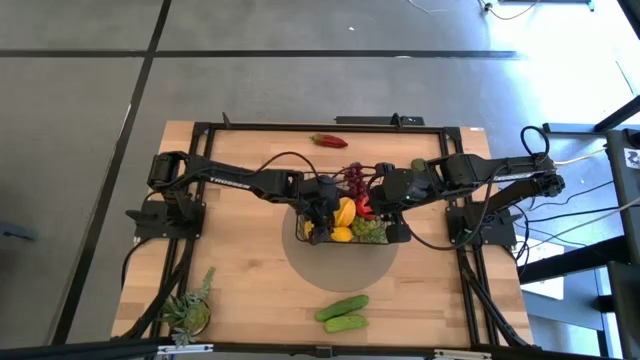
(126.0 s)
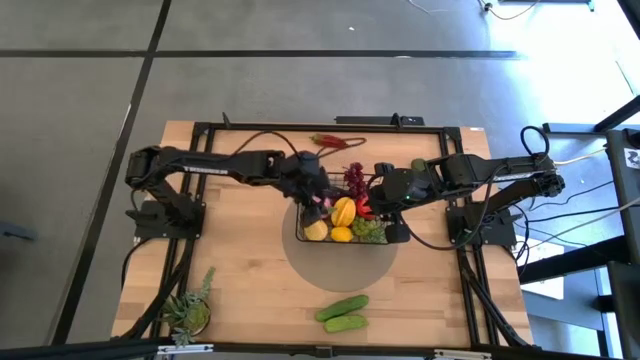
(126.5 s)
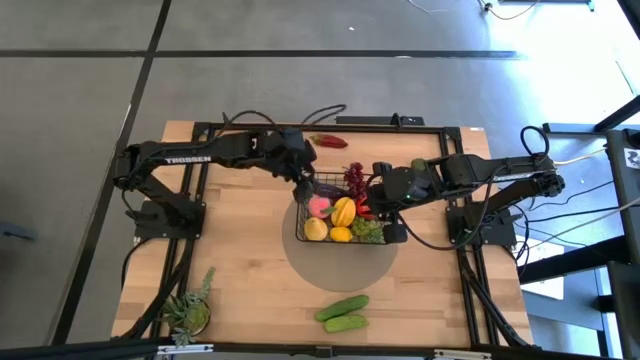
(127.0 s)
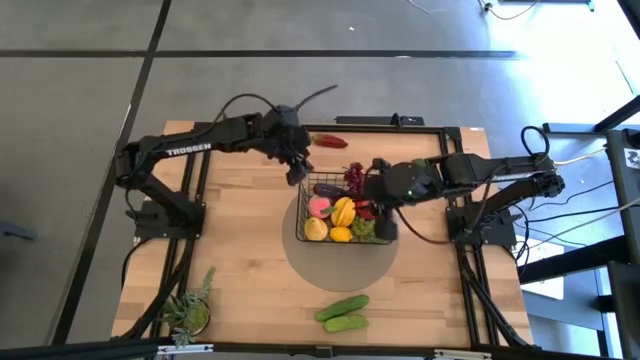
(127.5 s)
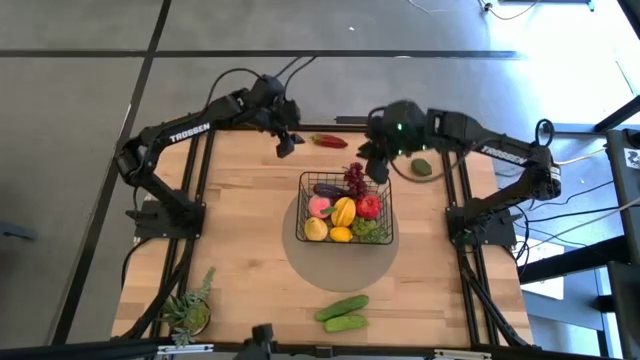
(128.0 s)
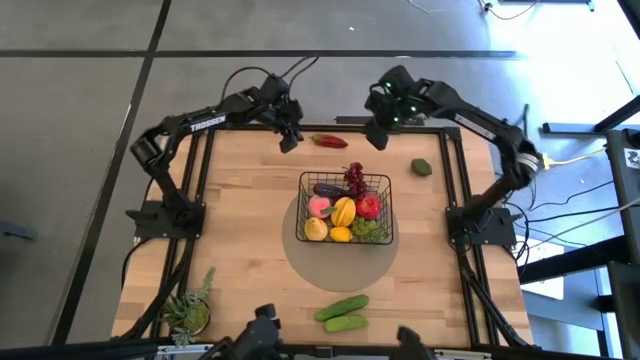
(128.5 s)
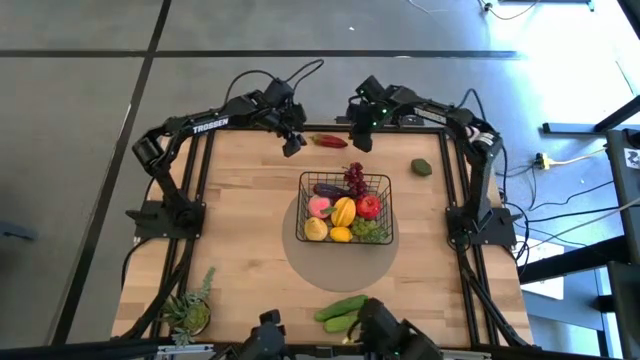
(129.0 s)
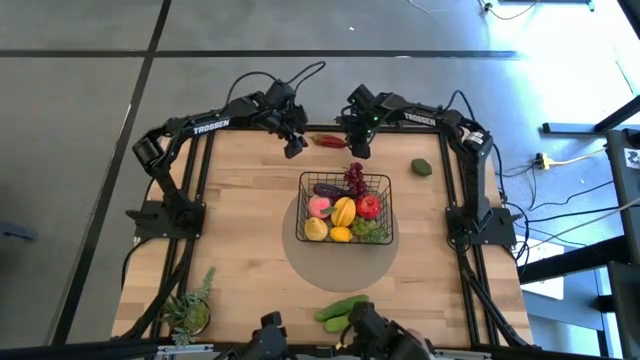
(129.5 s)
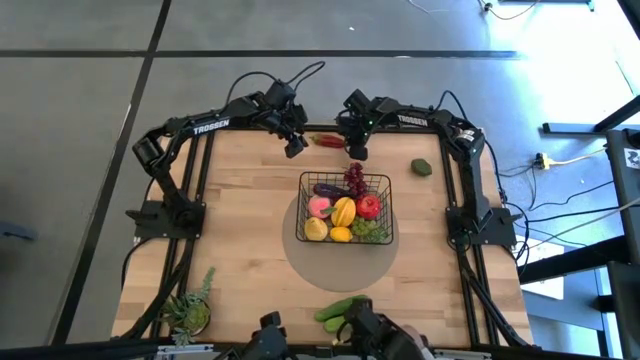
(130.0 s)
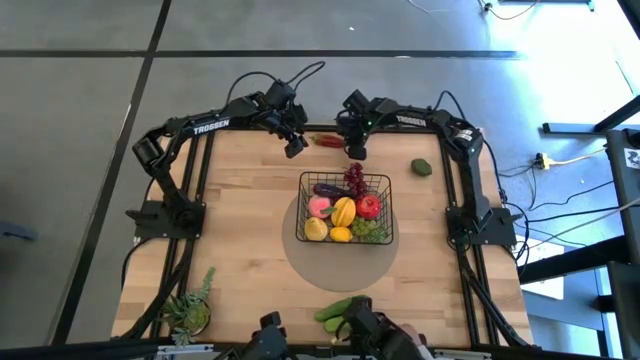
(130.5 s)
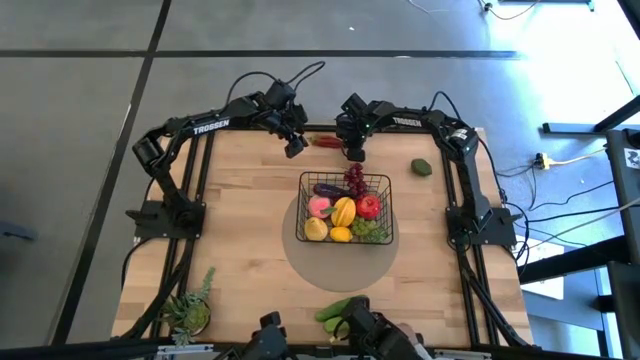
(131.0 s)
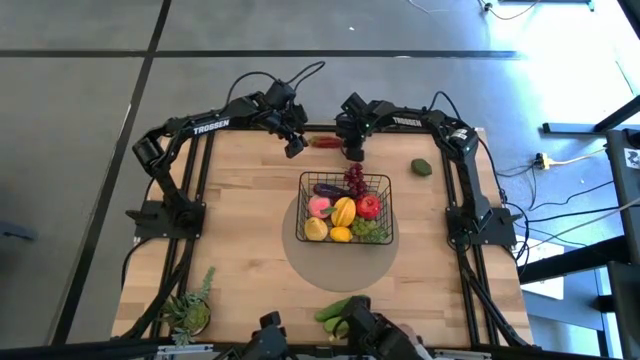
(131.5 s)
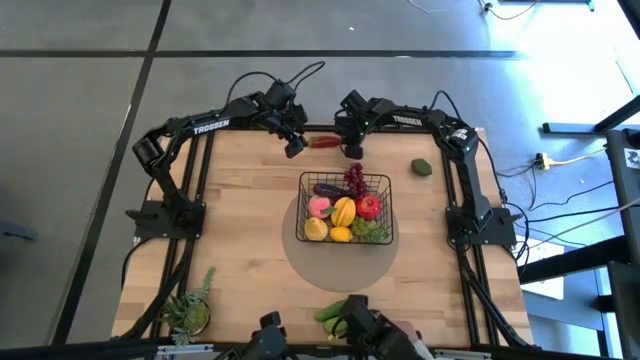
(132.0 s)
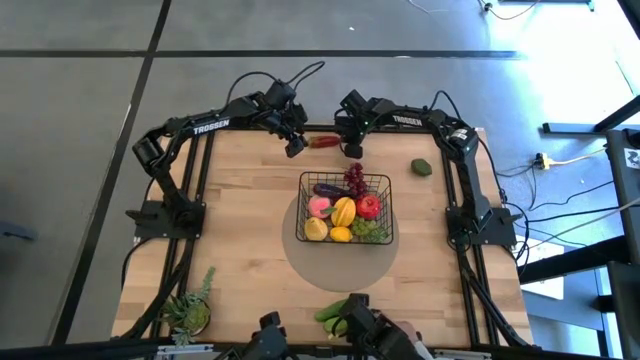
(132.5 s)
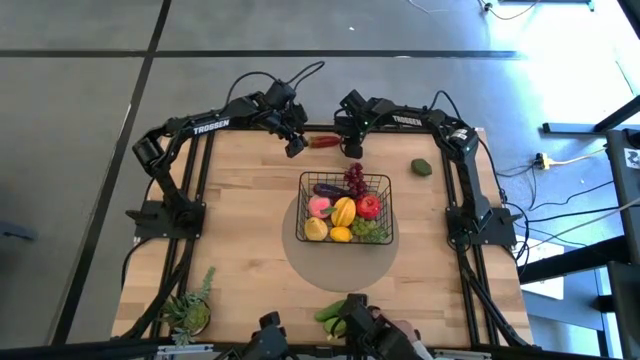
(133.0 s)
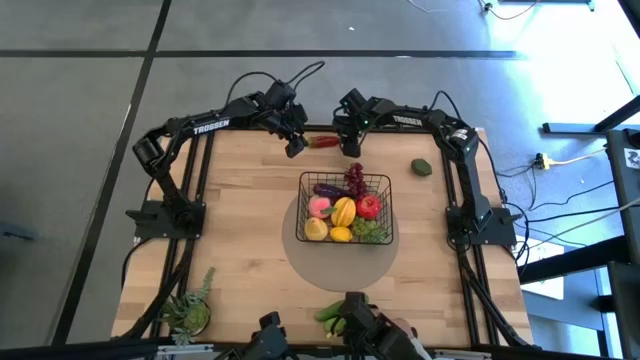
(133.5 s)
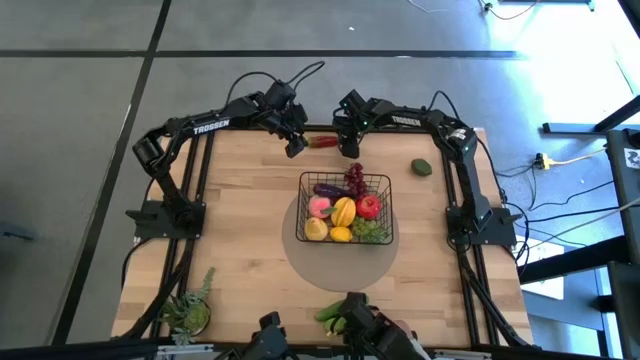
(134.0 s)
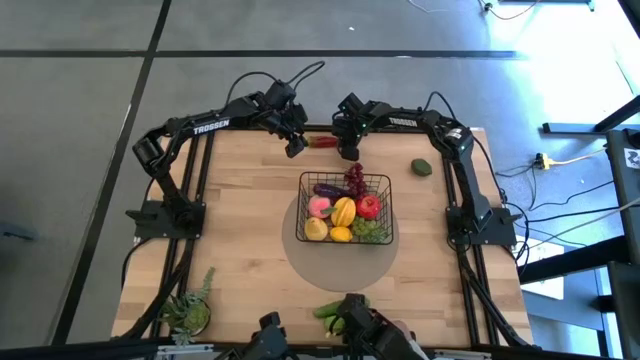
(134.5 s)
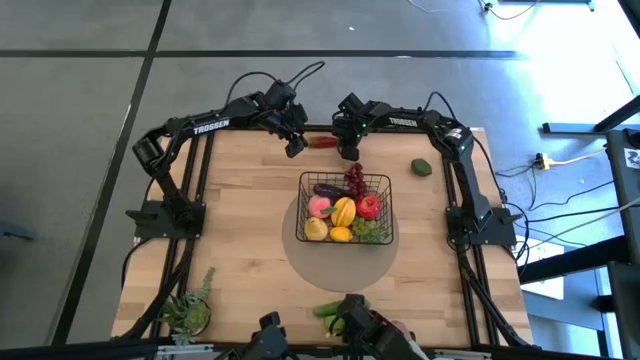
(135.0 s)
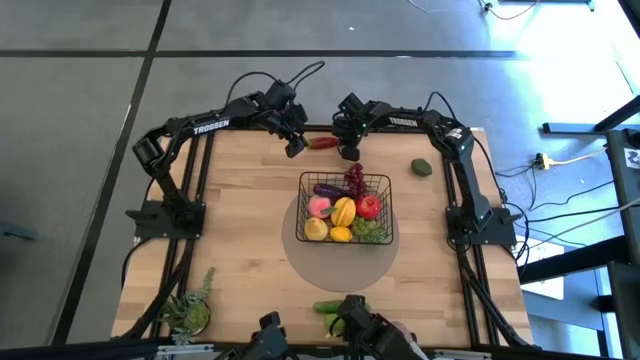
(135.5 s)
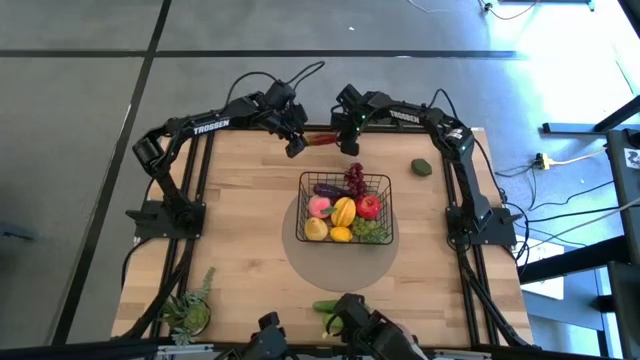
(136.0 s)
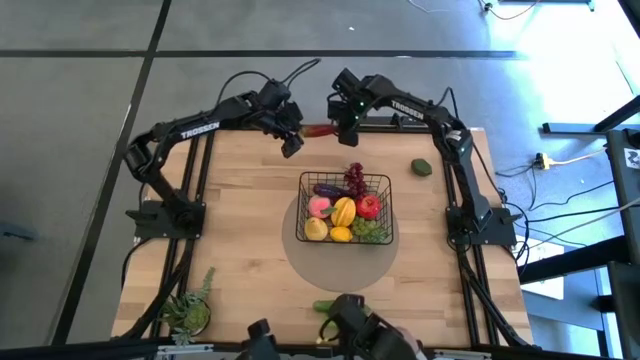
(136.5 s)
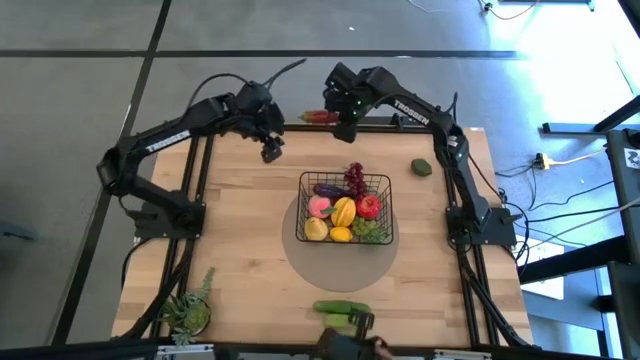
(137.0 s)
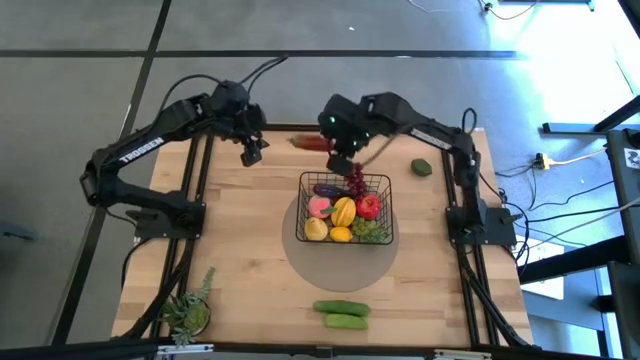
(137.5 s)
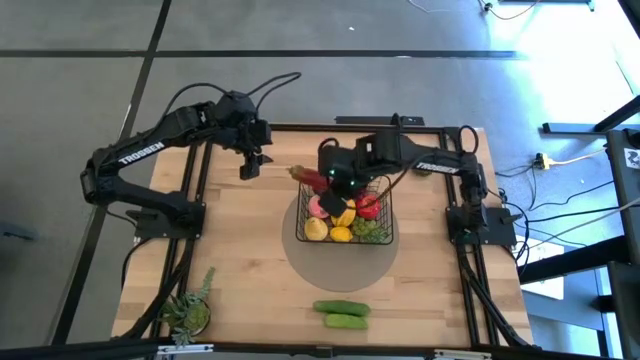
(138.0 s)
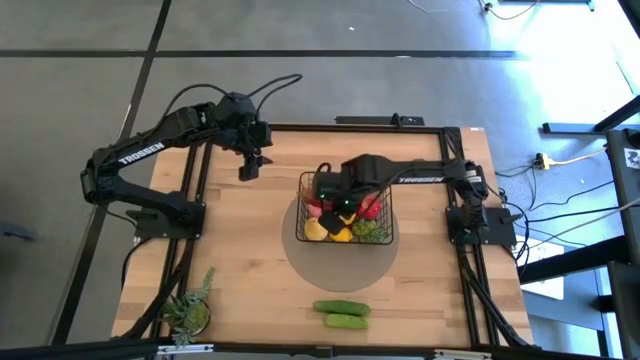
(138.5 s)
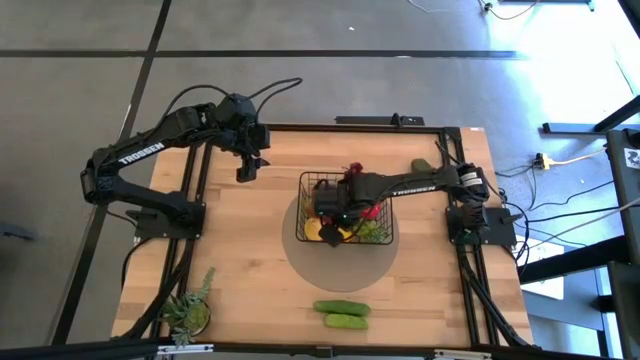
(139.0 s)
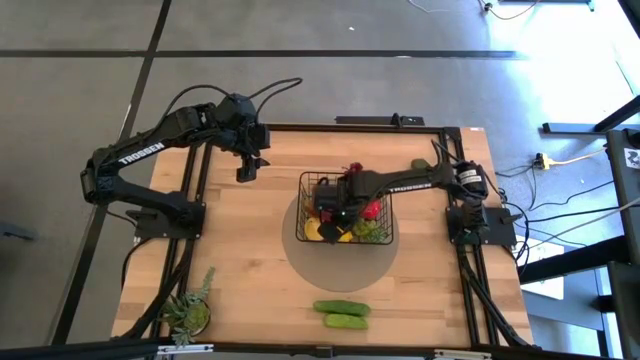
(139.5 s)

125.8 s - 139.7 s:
Task: Build produce basket
Put the red pepper into the black wire basket

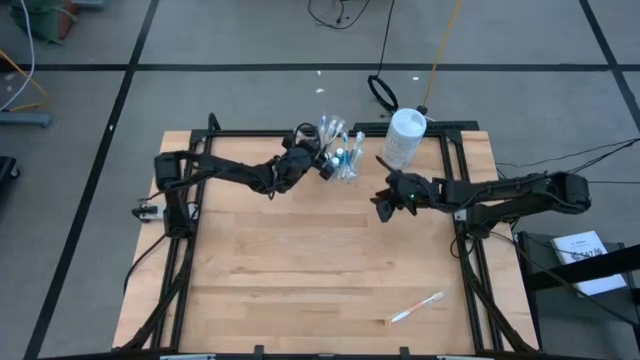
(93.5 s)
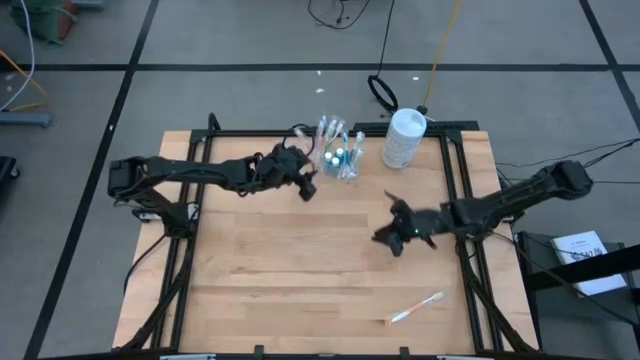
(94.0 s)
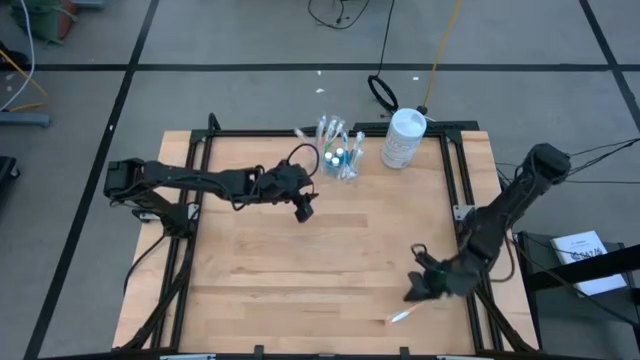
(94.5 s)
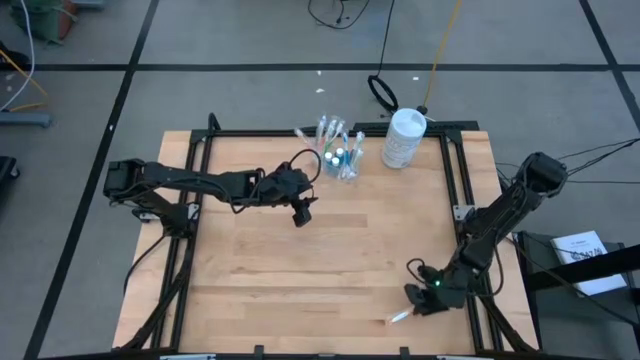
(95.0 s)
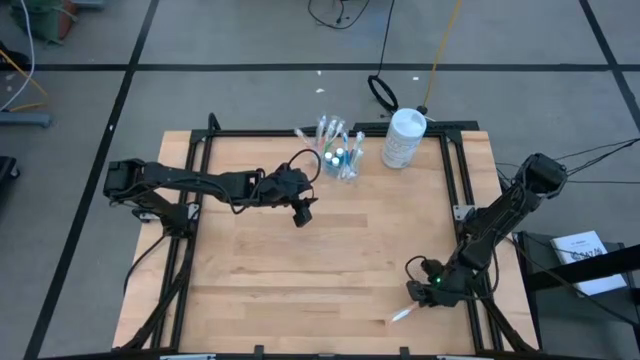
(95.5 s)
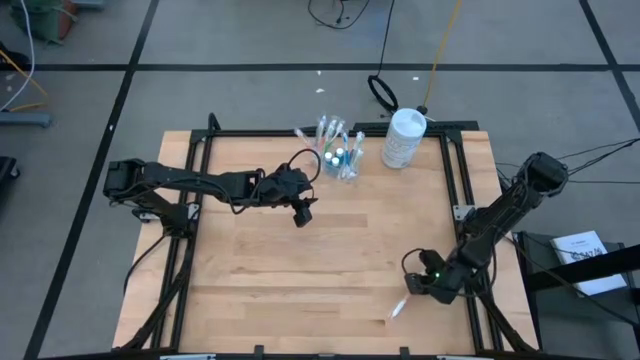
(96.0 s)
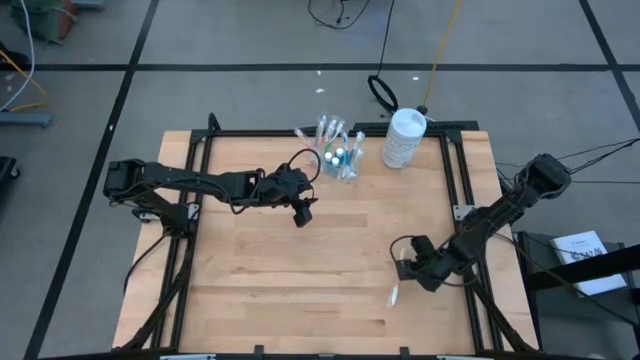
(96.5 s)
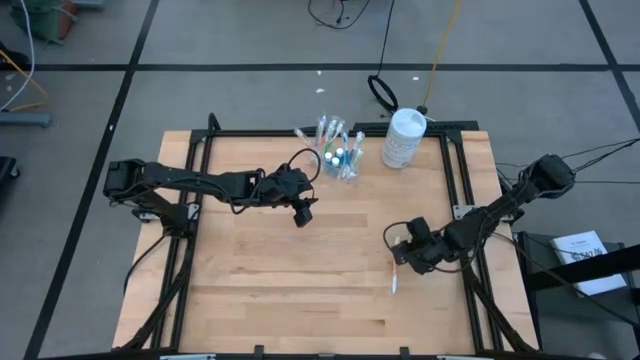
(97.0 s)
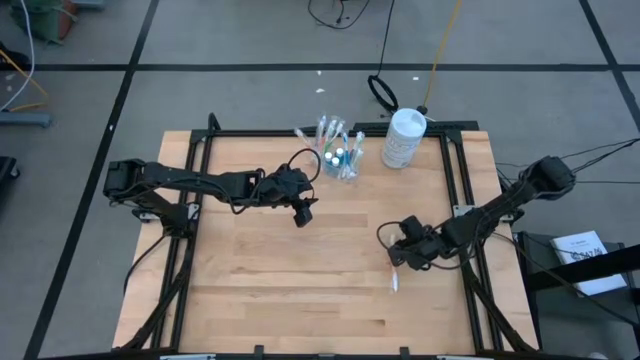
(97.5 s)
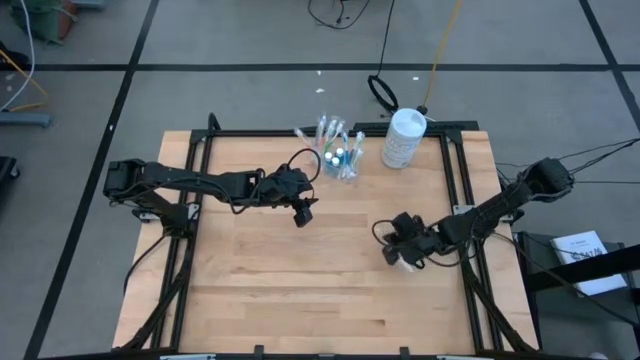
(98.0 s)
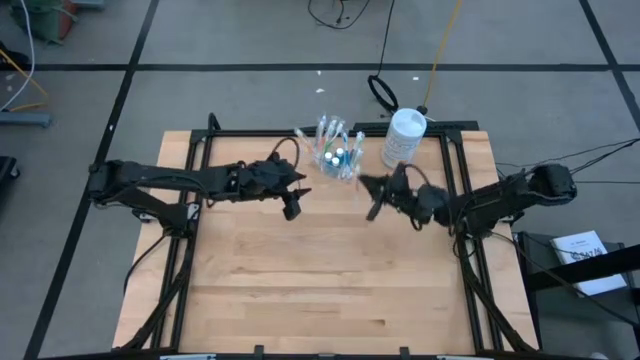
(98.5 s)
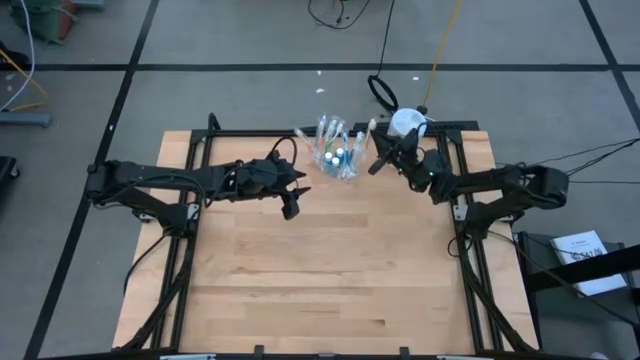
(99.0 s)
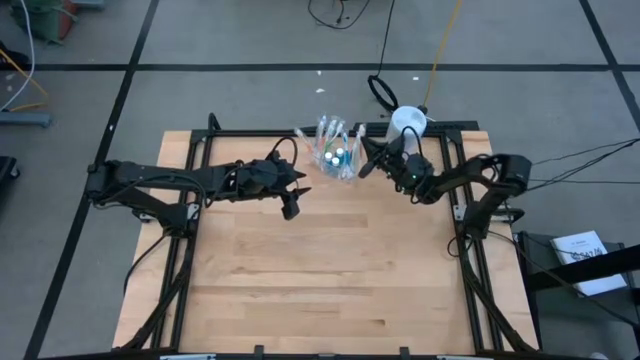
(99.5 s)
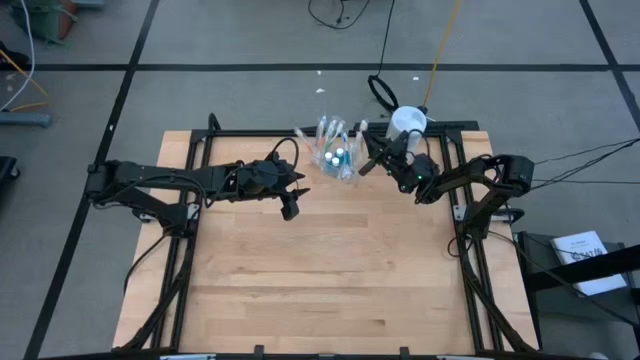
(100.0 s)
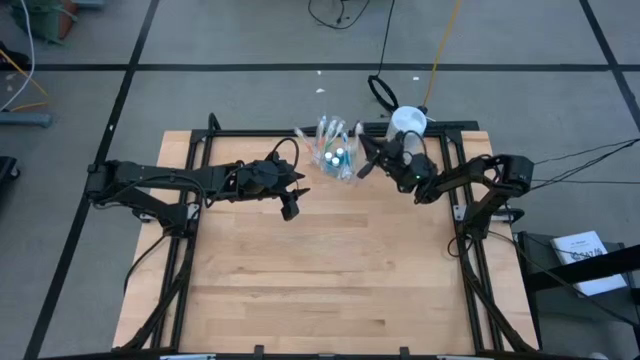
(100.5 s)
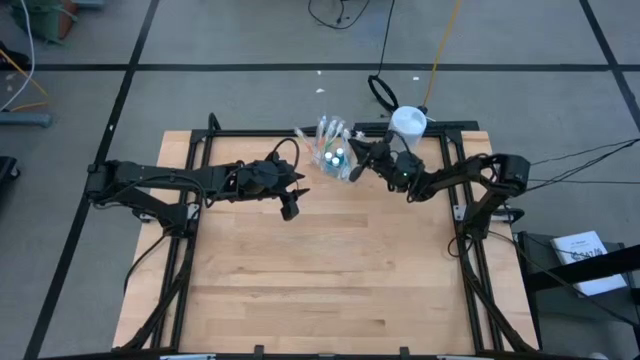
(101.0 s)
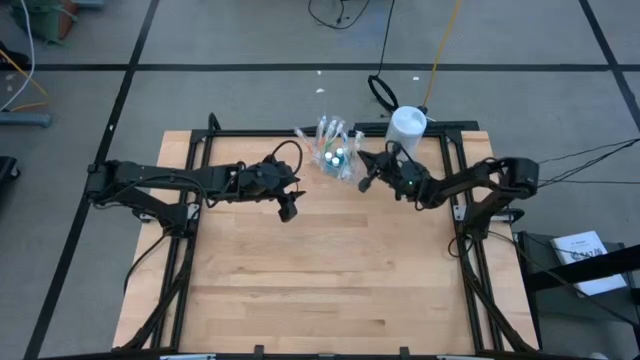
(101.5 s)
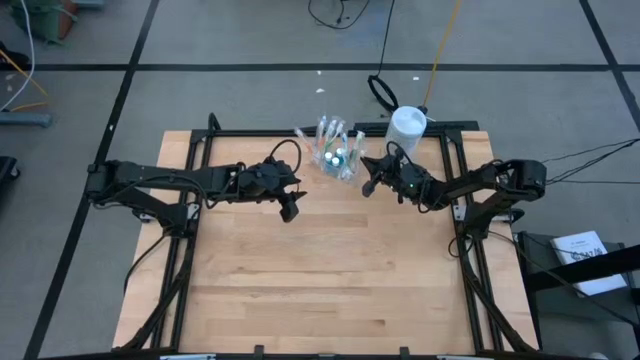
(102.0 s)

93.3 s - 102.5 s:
Task: Pick & Place toothbrushing station
Put the orange toothbrush into the transparent organizer
